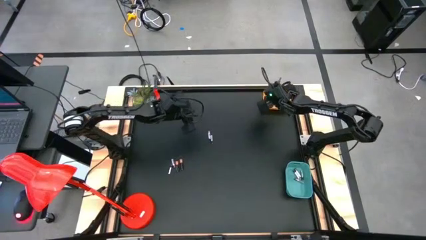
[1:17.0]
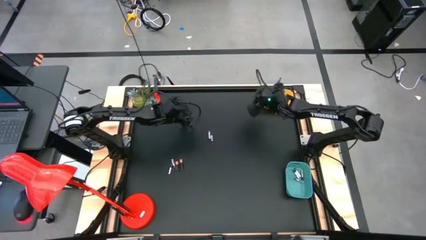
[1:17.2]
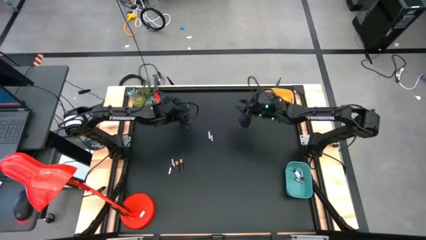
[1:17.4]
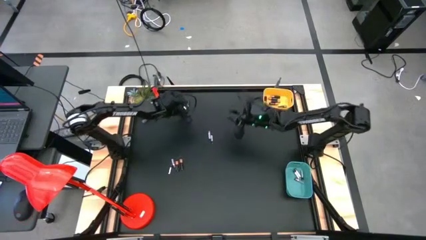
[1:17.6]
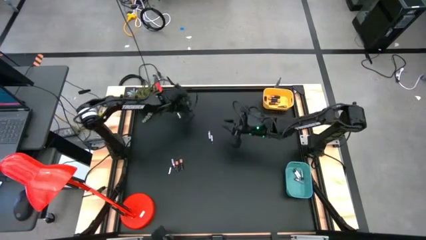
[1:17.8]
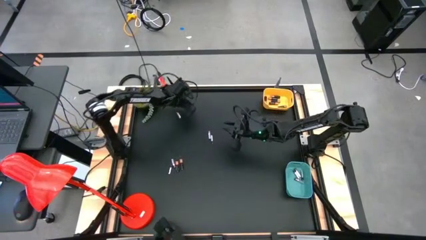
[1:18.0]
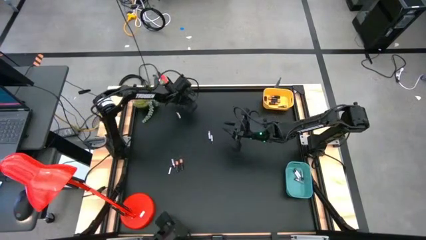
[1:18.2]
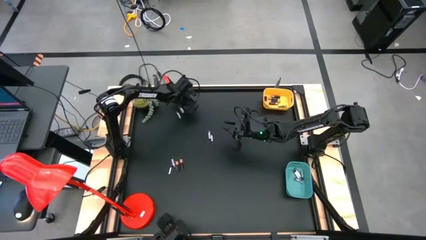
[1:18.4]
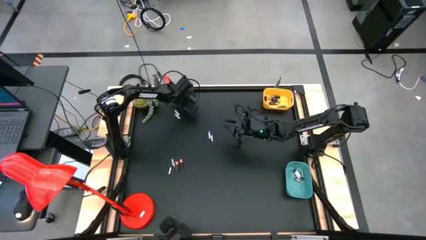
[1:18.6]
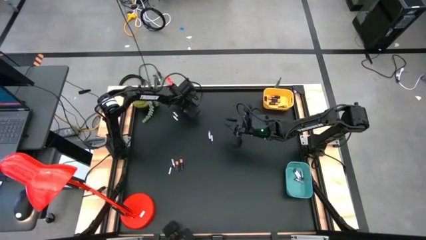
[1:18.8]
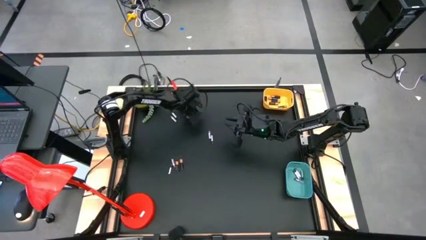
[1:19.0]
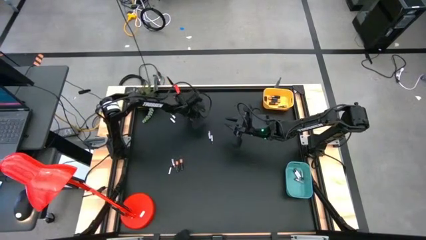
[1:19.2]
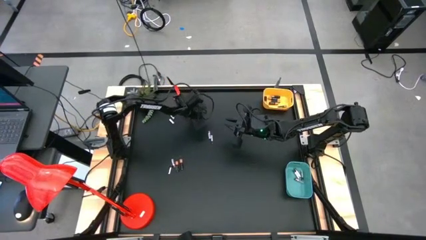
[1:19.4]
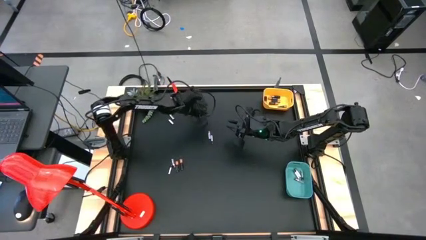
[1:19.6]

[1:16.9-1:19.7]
Task: Sort batteries
Put the black battery into the yellow bin

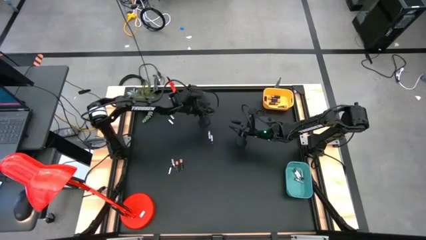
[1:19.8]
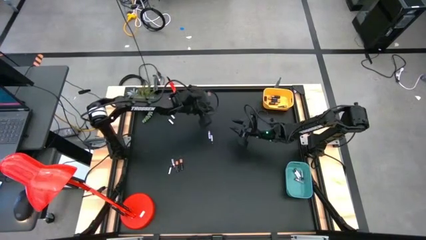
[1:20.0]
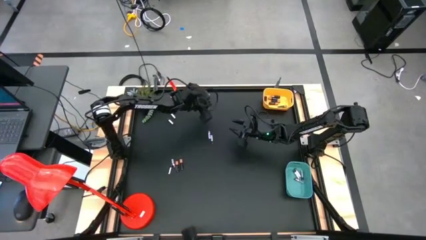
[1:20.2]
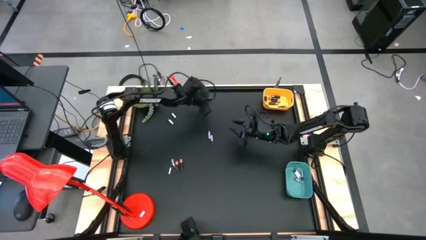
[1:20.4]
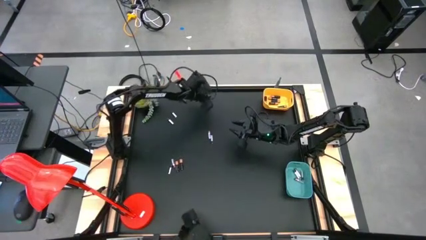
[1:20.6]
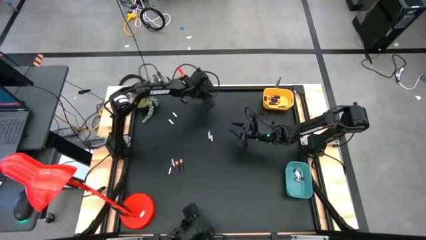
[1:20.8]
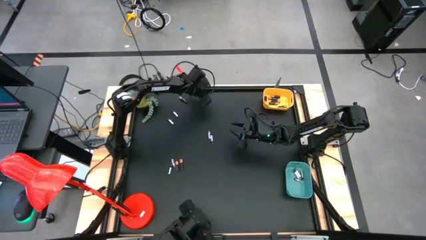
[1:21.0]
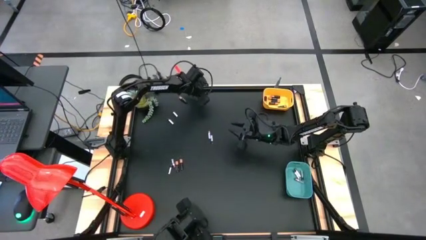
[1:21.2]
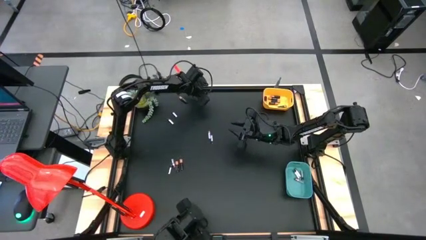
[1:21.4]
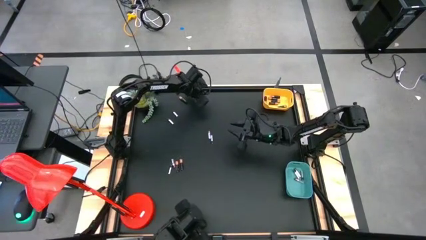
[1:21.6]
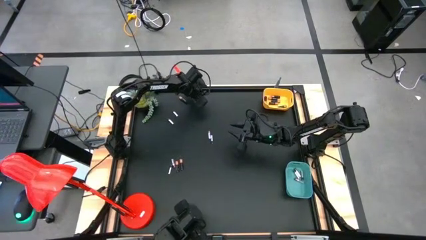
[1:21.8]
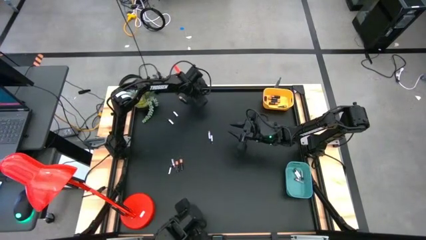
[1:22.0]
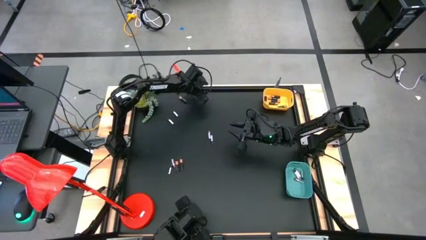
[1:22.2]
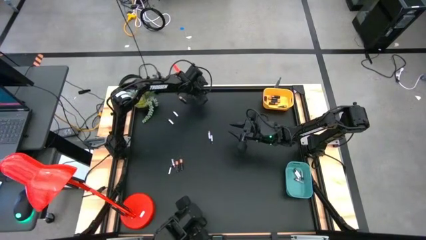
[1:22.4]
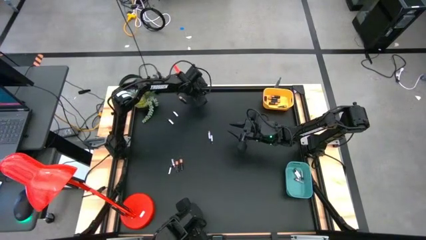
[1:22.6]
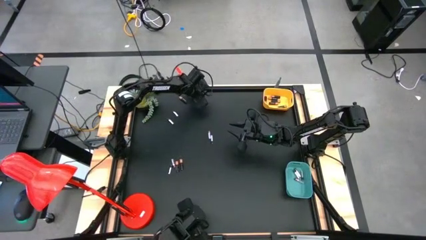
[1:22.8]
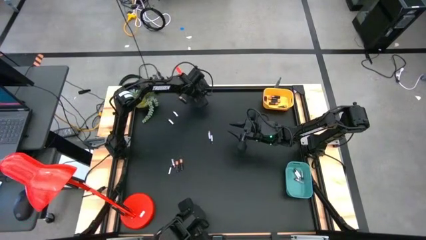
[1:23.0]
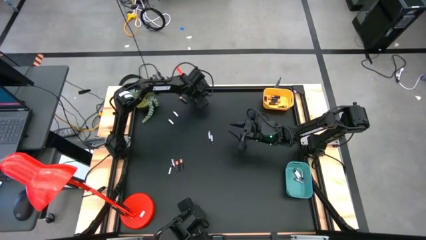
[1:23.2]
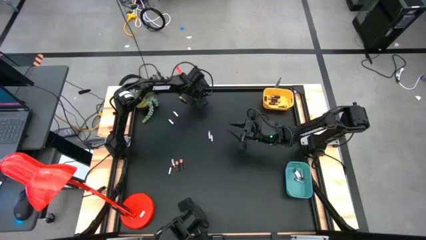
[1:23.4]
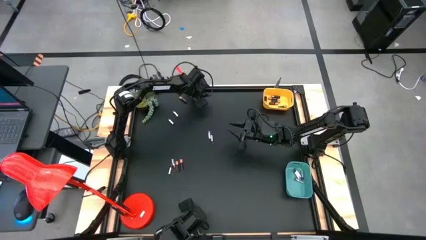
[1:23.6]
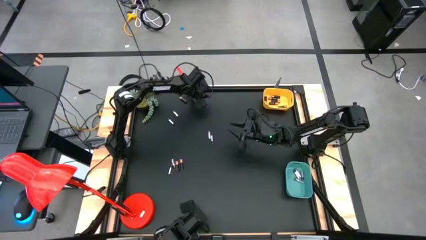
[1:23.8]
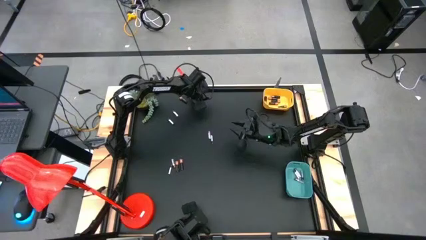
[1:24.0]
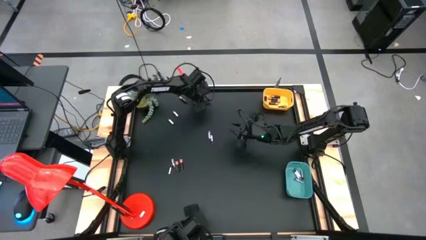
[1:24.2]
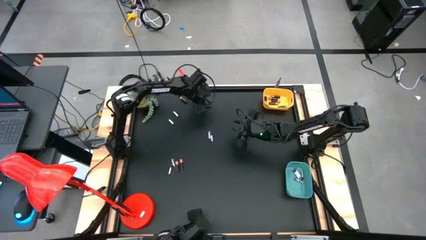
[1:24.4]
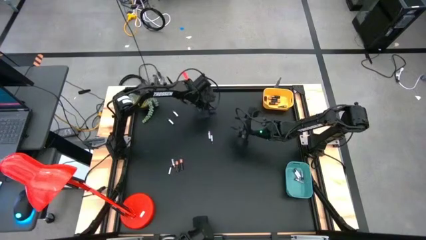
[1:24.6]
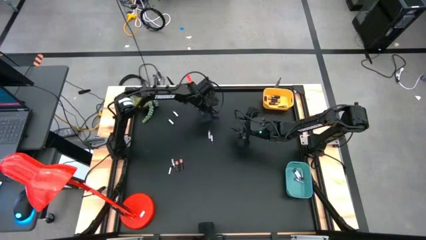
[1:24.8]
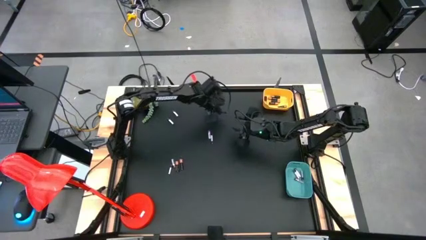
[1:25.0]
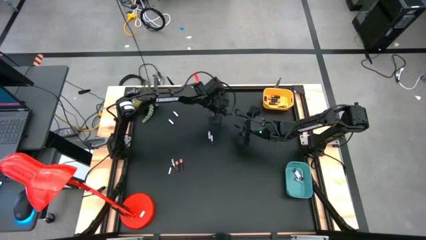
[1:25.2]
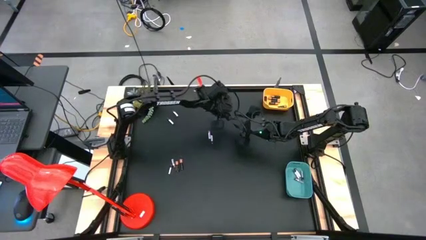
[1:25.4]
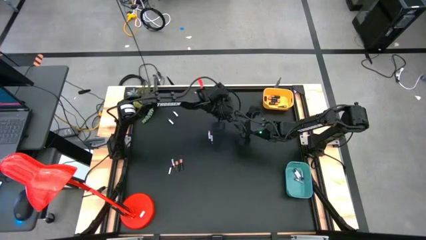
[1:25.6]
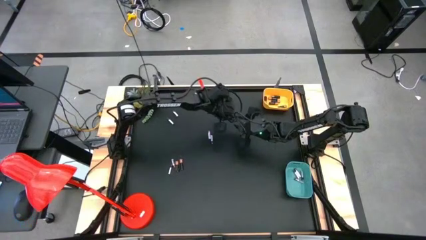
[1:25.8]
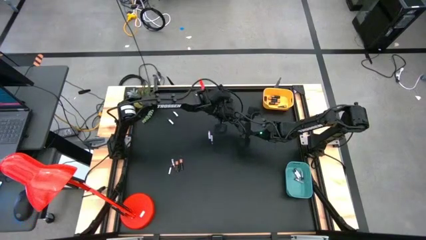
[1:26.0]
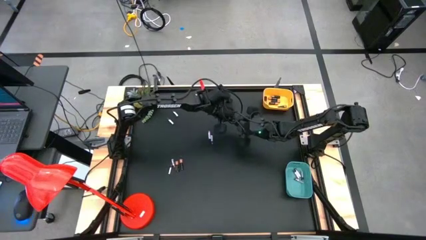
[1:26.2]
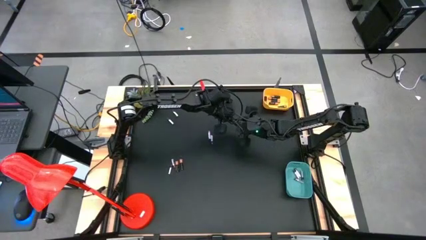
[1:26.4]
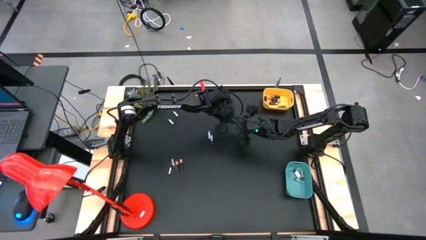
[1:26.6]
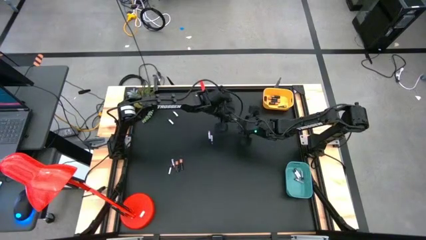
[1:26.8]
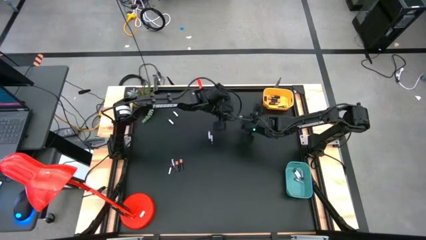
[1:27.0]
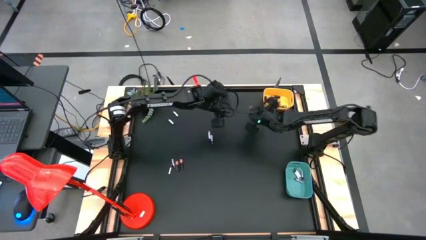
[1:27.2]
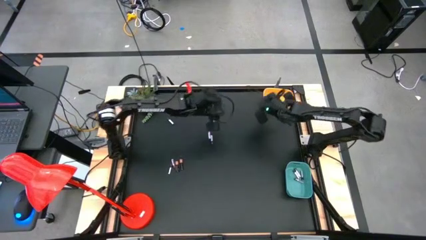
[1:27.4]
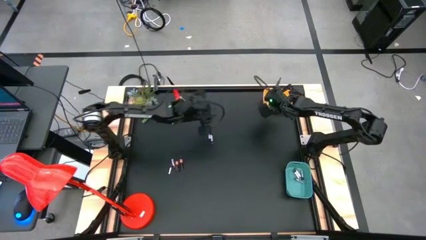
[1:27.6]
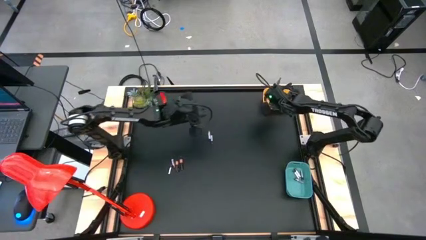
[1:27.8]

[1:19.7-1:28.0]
Put the black battery into the yellow bin

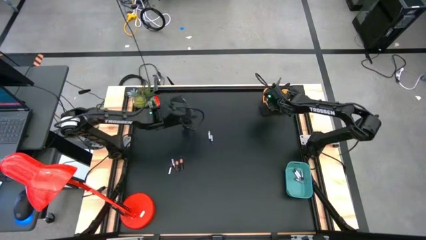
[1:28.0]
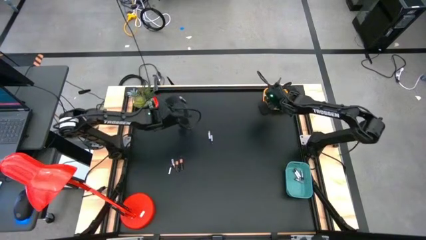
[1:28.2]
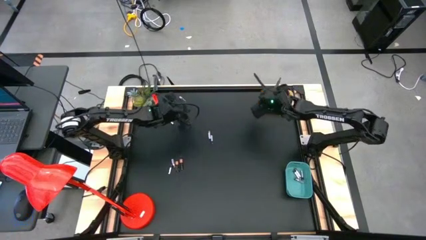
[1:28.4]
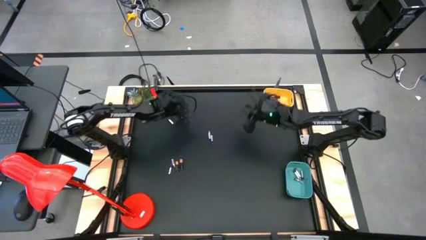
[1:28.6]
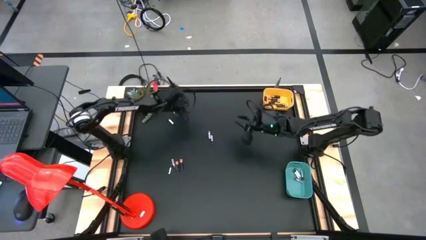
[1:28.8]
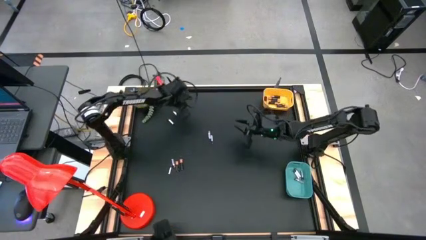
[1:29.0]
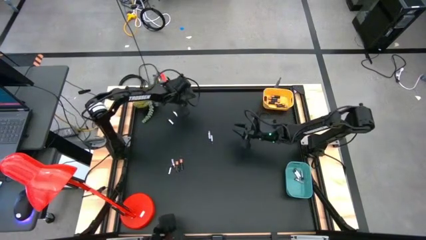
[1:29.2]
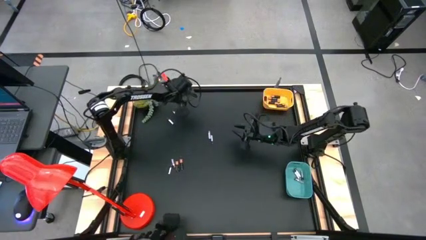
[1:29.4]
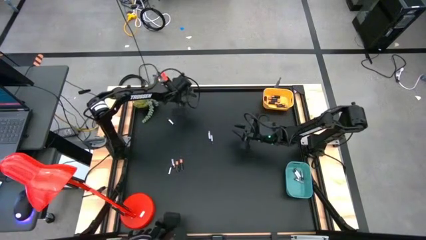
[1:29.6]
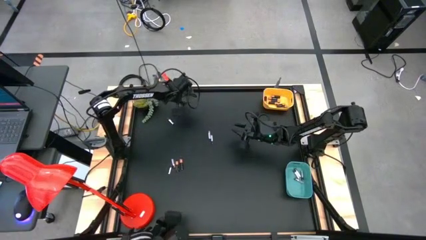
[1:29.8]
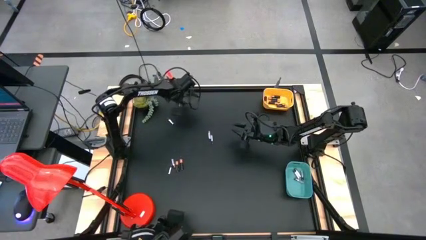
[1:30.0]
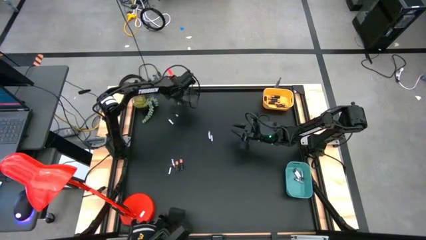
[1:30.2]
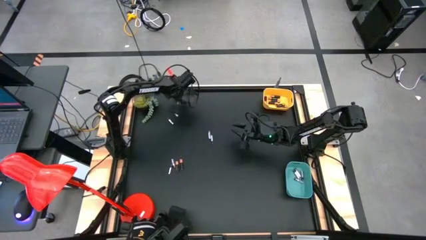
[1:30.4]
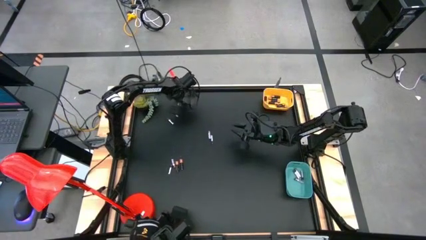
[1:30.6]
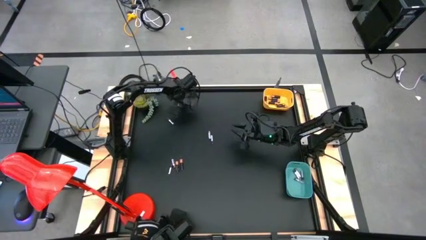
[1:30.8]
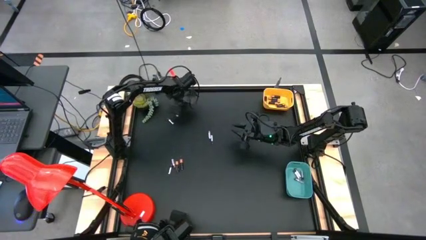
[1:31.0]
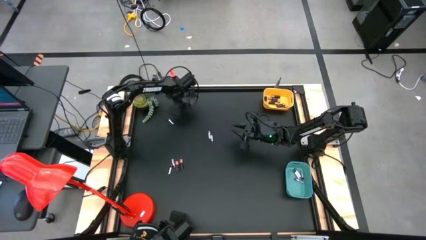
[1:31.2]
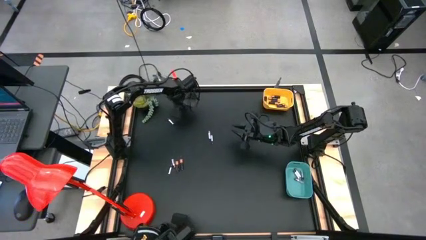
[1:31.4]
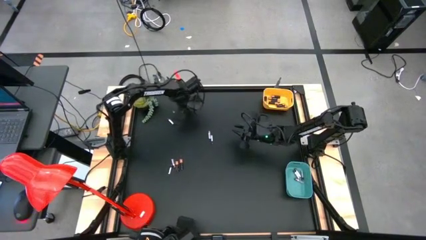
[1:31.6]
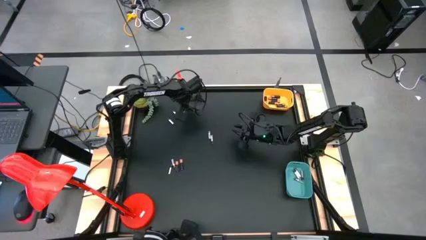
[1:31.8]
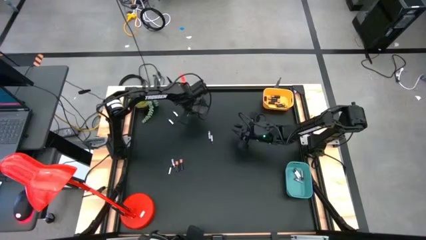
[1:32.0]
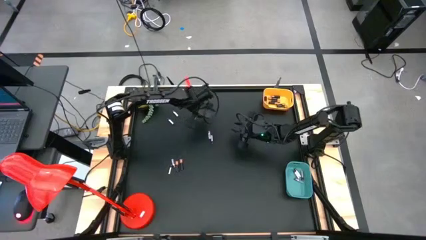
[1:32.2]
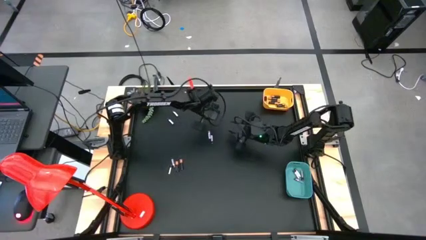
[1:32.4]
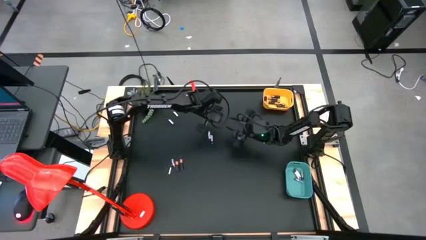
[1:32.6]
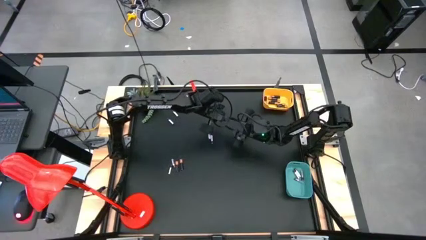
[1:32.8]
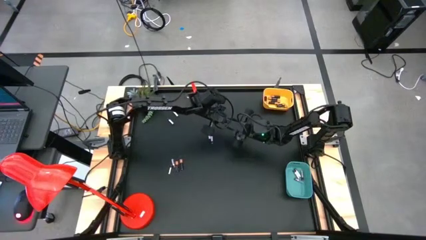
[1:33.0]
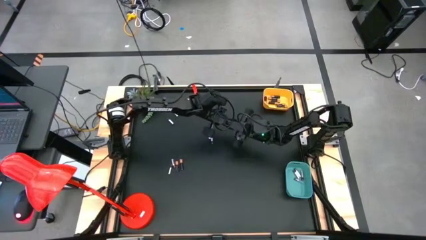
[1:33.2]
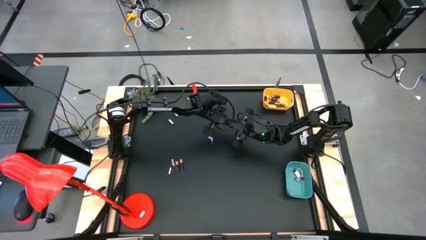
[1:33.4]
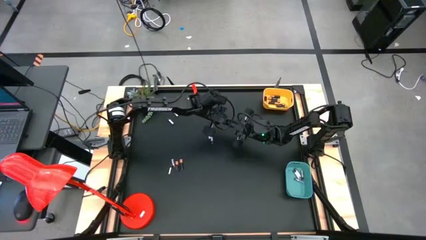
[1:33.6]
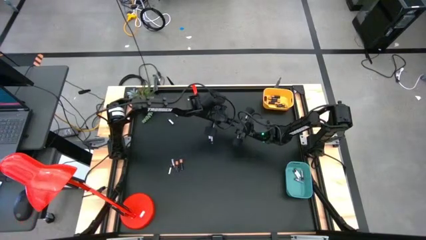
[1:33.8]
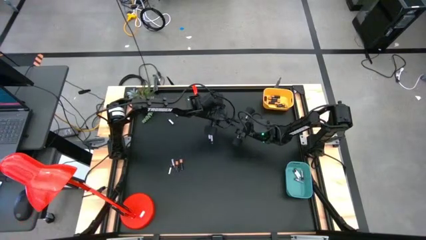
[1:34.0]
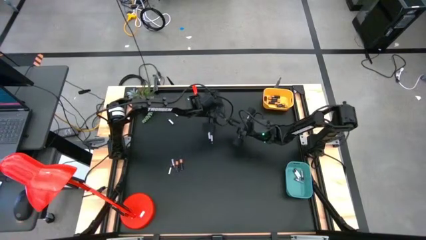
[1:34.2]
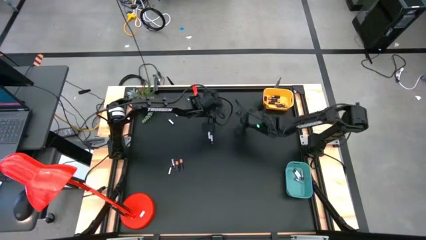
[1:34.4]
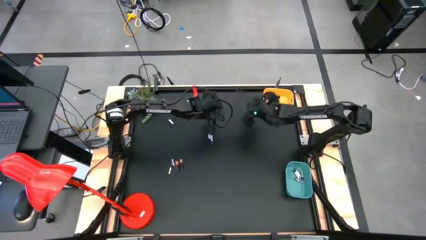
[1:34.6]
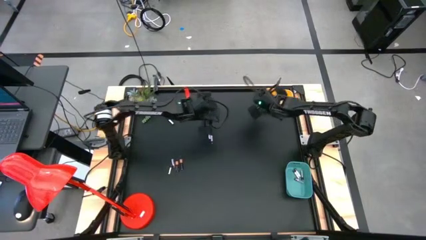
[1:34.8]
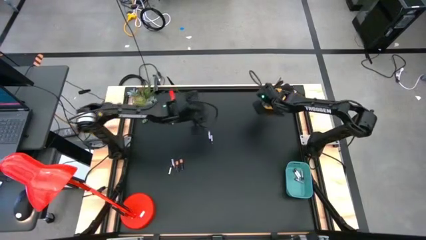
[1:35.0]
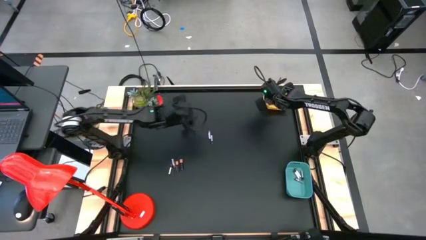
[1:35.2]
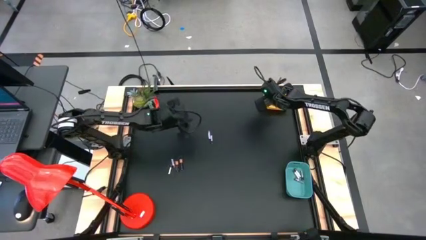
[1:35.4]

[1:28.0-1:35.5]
Put the black battery into the yellow bin
